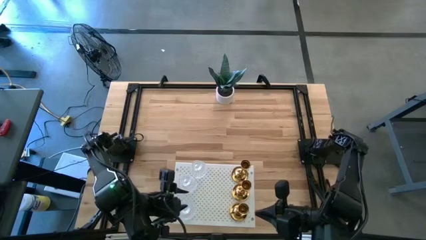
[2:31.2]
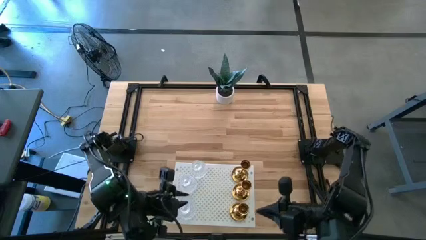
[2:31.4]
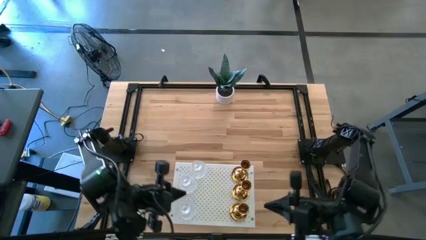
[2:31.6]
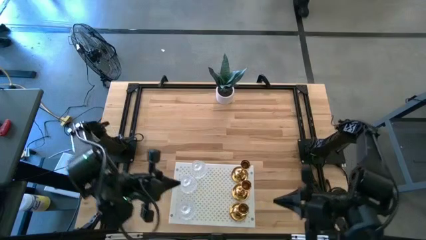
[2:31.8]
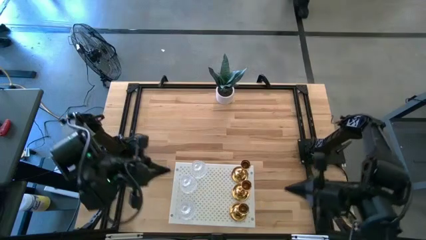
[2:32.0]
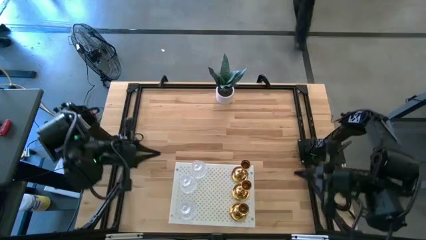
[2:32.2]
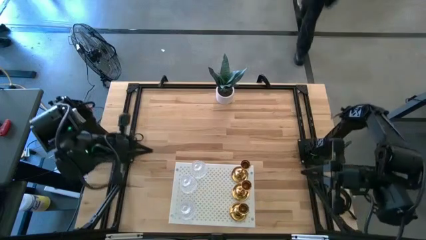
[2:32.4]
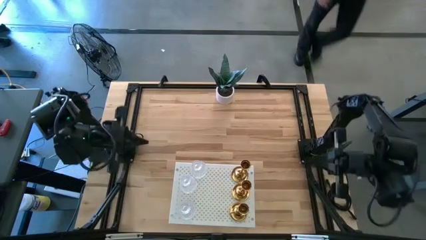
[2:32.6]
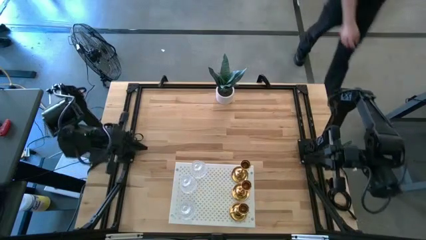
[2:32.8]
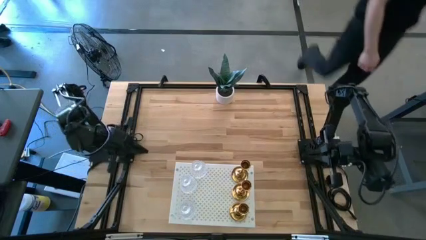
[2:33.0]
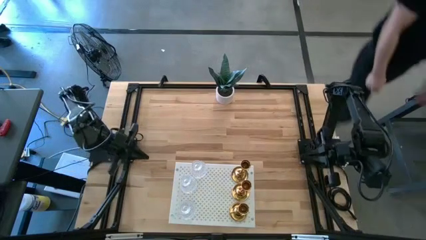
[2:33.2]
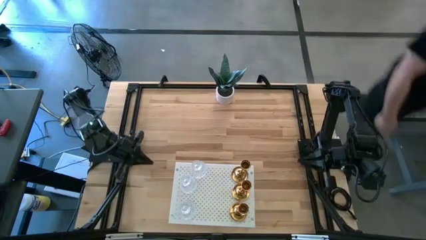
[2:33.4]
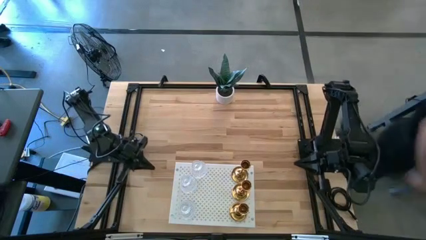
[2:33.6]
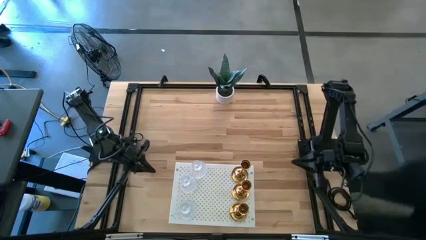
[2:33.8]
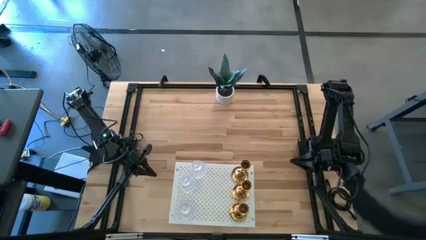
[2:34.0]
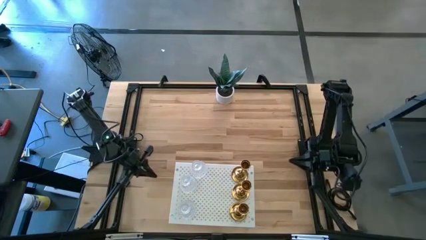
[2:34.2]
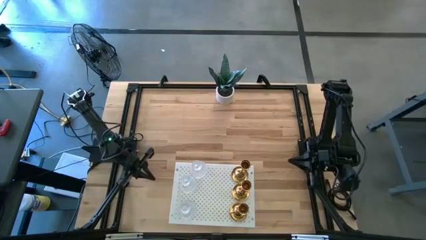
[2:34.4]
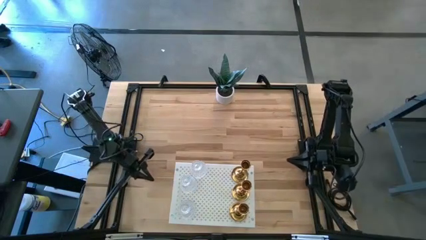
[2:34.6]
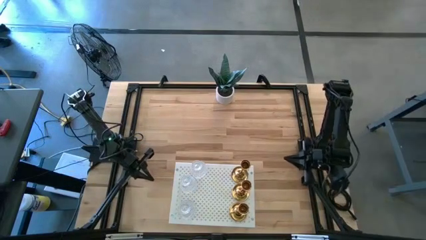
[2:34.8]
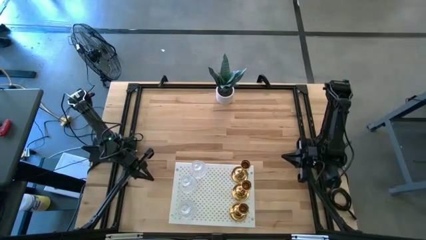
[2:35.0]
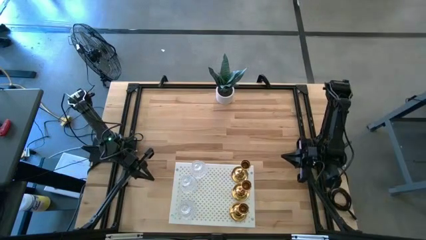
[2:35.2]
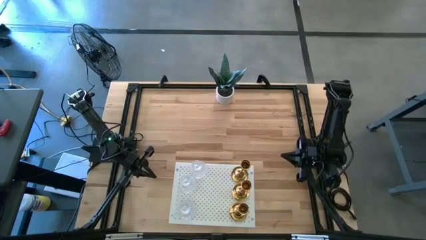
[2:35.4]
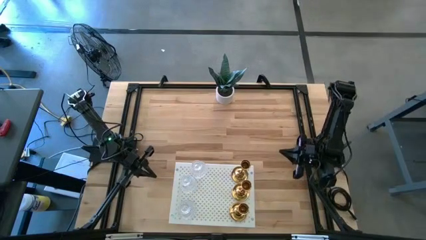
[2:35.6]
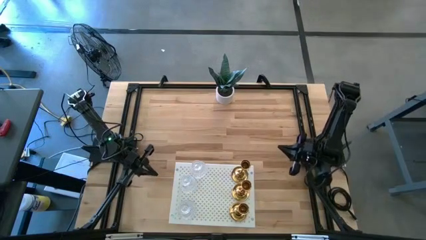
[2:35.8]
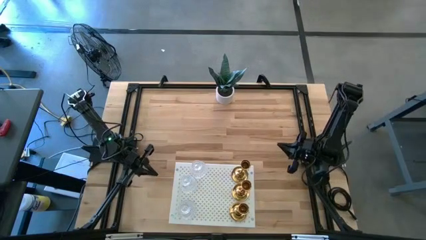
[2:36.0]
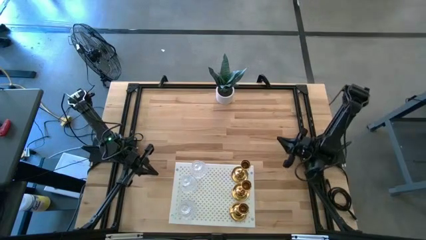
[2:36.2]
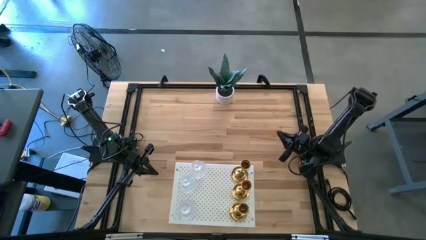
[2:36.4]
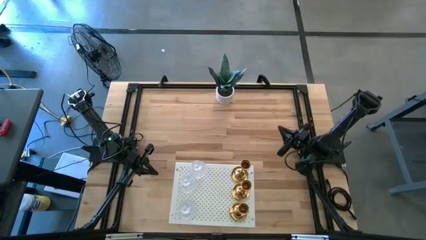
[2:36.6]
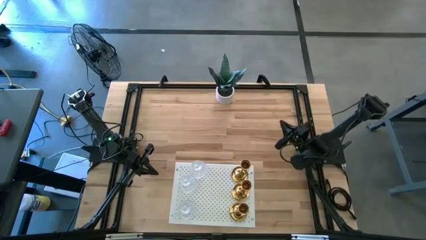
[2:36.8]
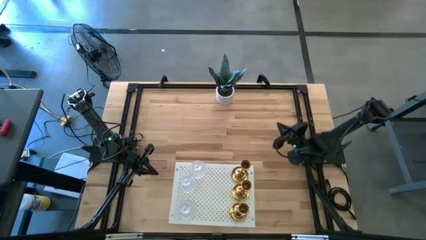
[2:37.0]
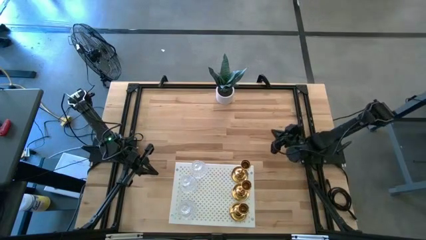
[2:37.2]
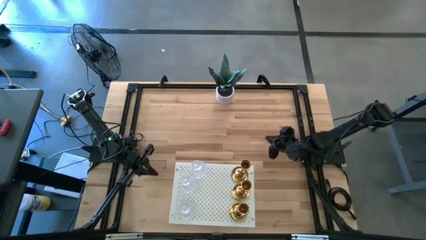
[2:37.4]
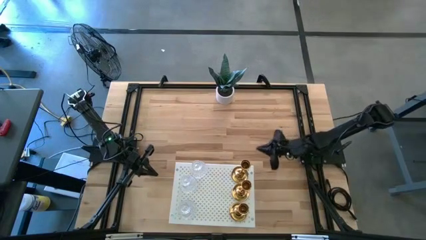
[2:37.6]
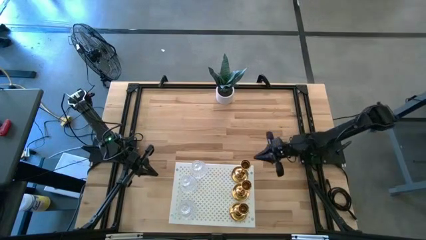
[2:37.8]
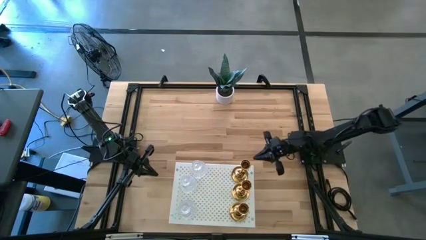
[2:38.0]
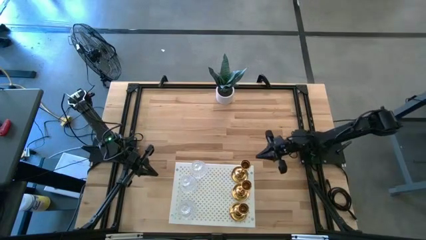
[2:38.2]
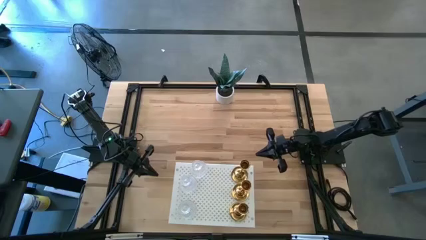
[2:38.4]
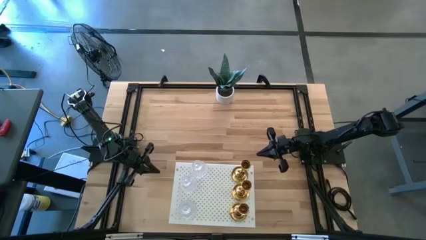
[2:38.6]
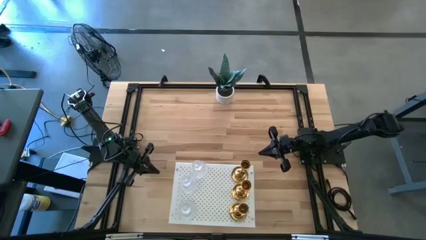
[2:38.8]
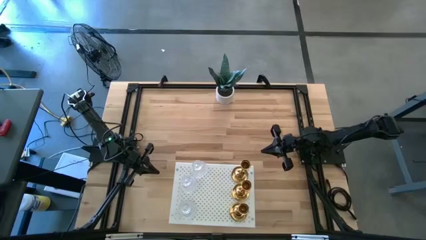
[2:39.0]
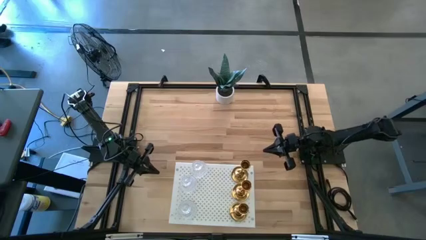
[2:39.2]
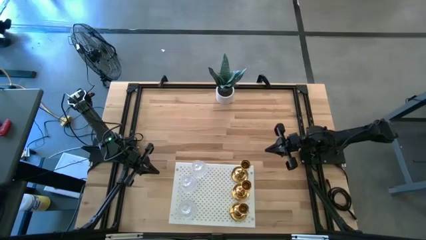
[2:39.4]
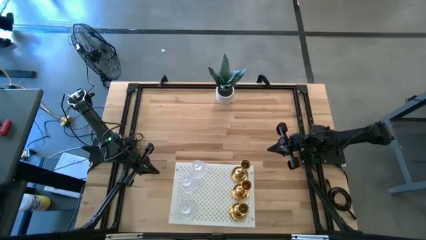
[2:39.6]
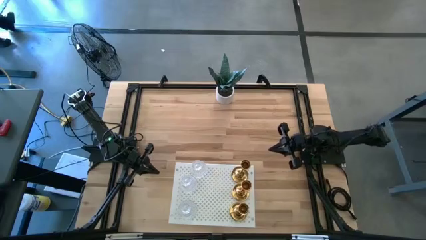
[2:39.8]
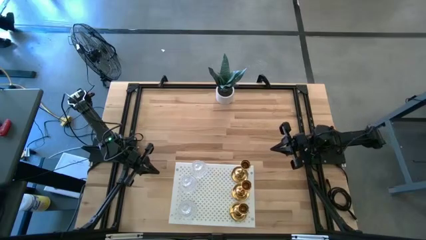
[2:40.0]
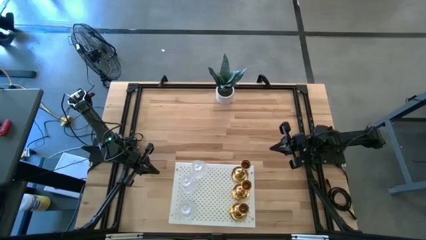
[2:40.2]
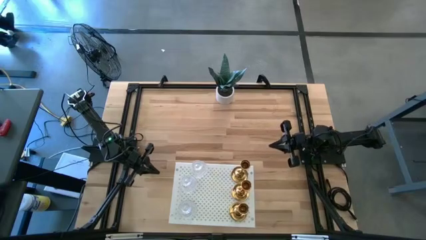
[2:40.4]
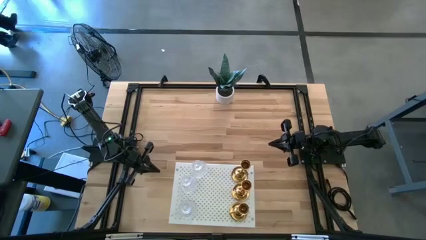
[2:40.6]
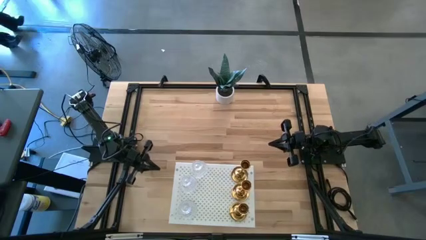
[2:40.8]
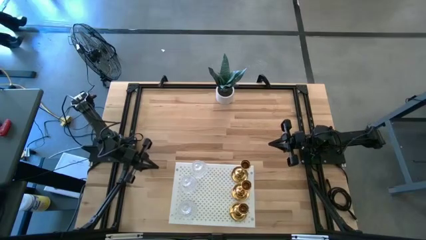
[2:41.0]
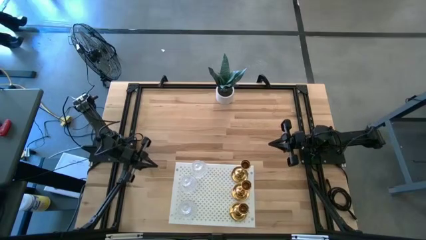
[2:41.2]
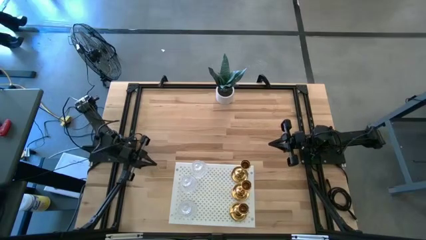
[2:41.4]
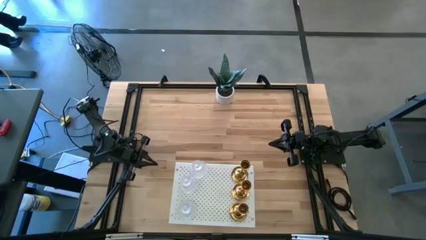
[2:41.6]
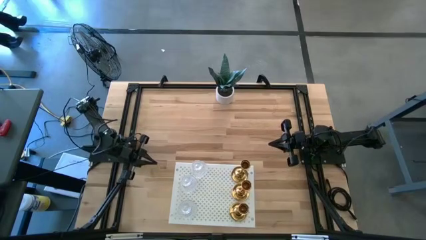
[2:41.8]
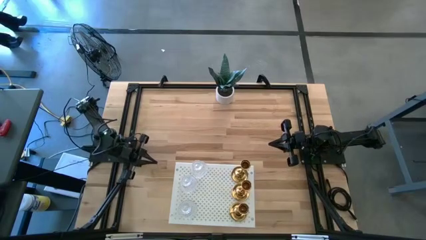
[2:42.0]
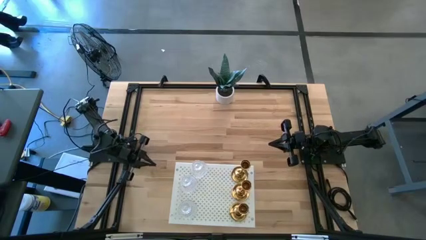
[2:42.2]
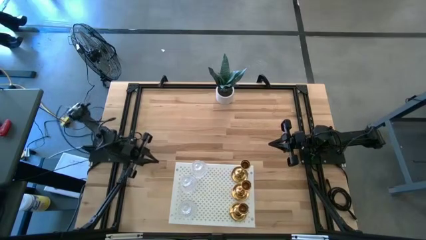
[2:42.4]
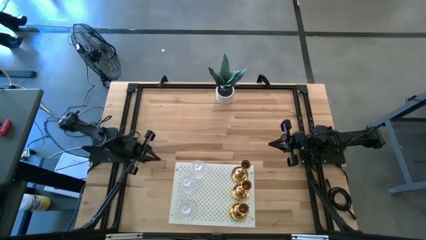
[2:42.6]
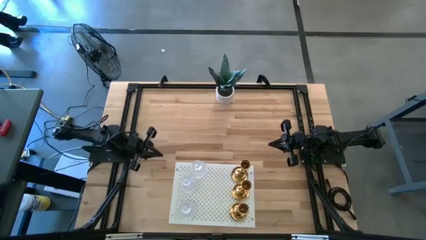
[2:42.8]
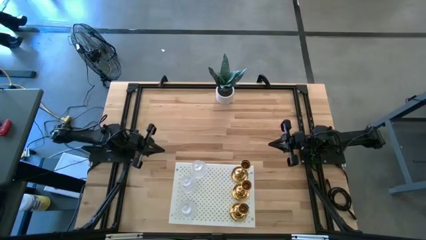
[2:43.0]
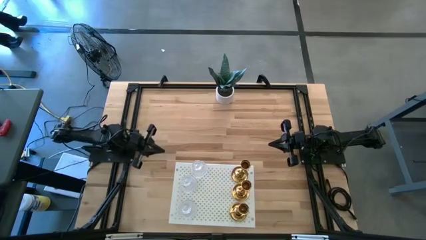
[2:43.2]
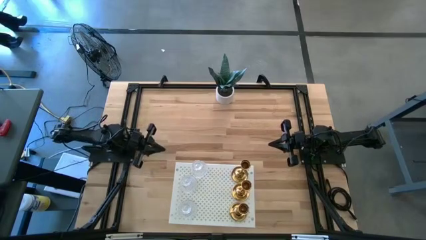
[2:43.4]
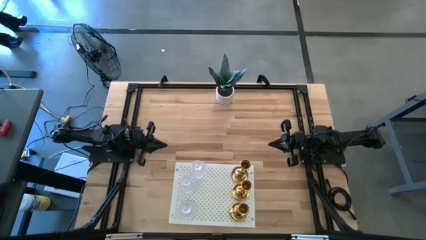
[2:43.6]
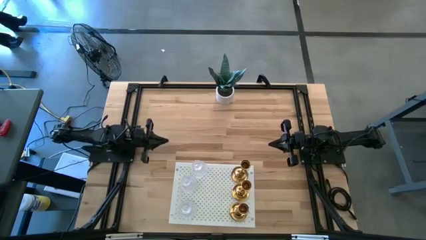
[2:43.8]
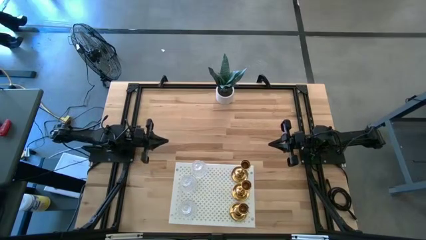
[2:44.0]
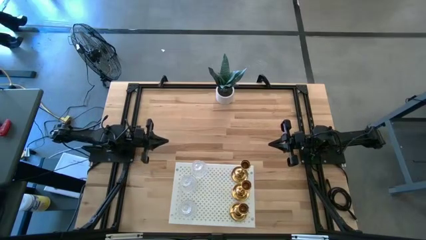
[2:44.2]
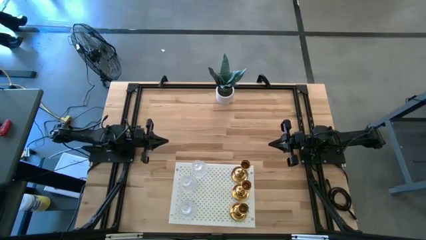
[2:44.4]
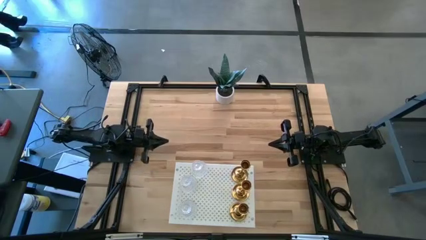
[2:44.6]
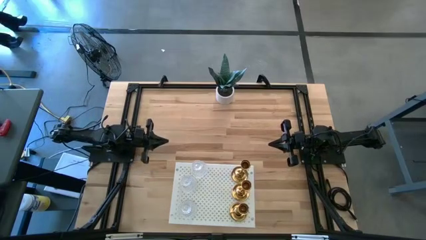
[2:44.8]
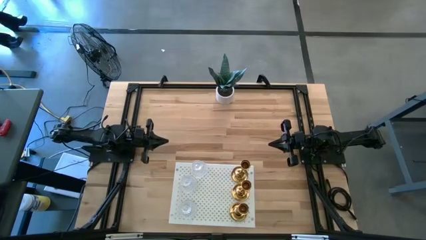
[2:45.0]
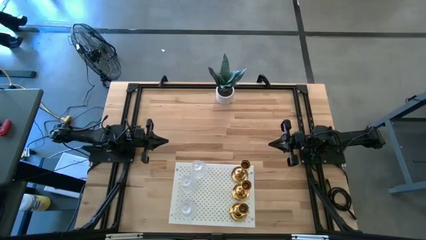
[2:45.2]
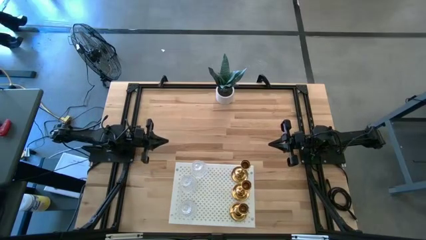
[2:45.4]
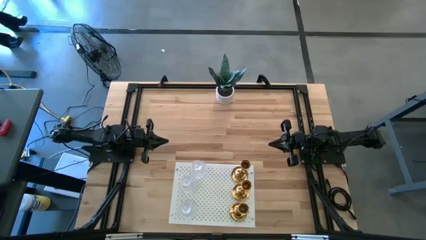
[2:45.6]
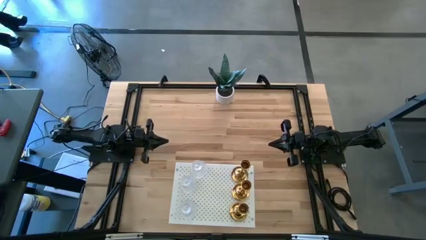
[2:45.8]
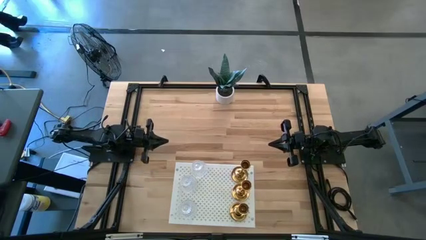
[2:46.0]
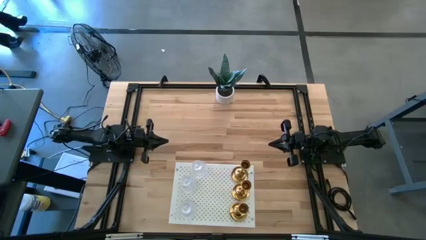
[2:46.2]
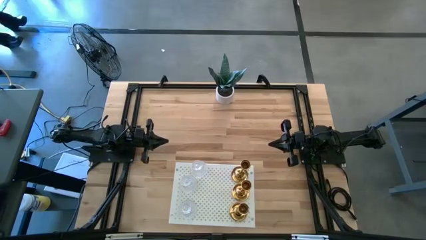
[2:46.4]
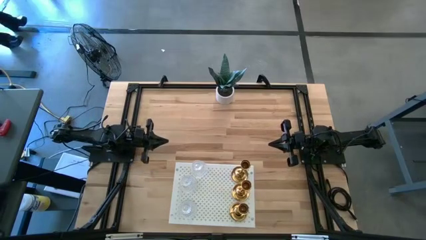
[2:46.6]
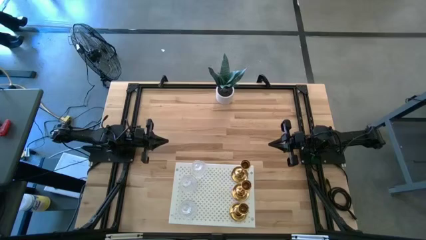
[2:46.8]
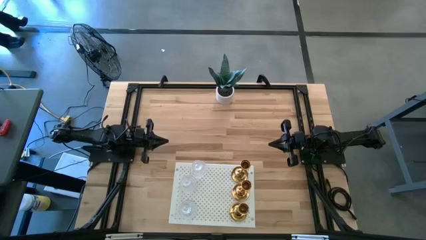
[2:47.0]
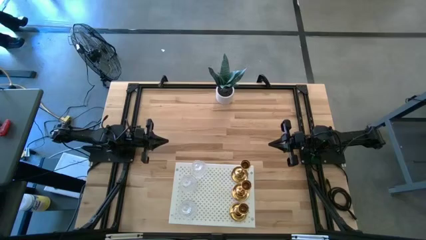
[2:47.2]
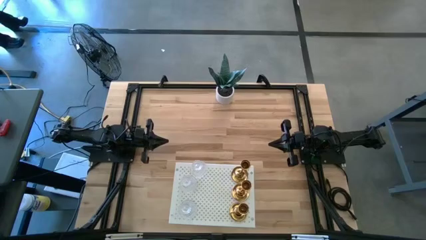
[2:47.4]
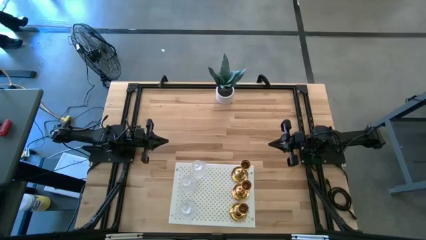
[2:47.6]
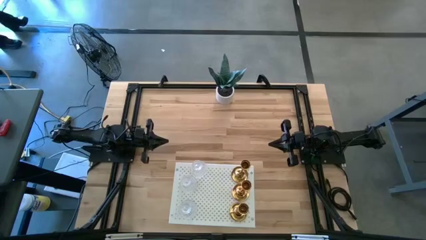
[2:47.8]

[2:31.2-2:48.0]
Task: Pick & Place candle stick holders
Return to Home Position
